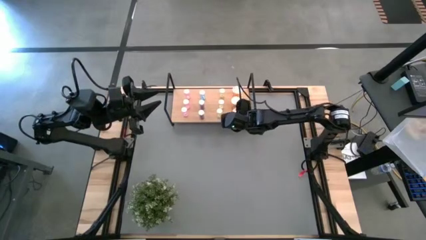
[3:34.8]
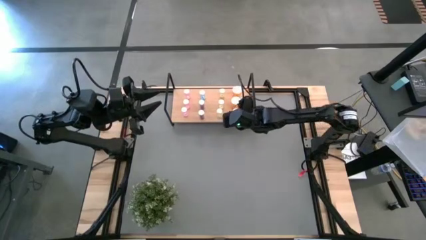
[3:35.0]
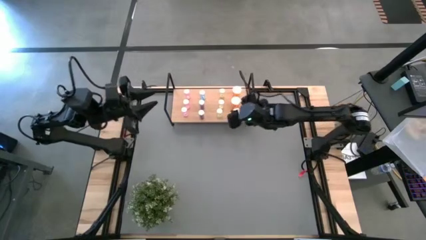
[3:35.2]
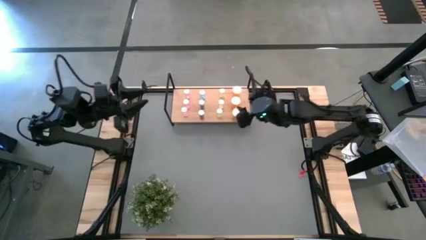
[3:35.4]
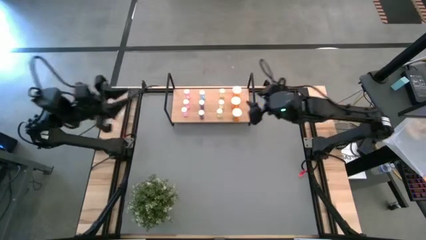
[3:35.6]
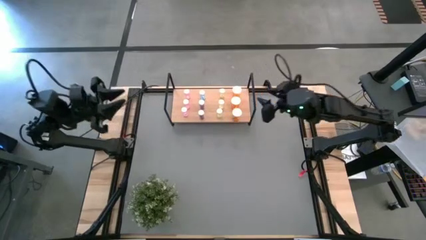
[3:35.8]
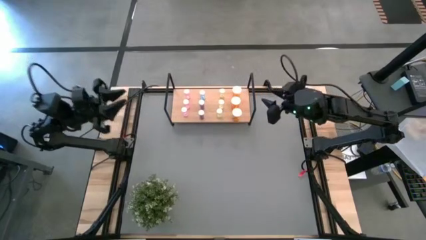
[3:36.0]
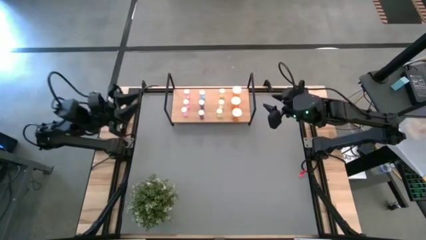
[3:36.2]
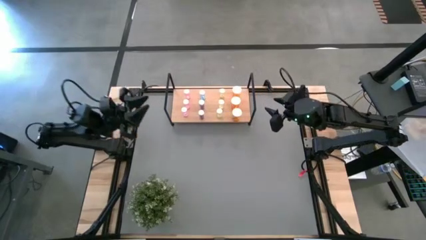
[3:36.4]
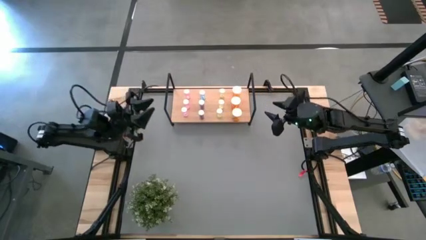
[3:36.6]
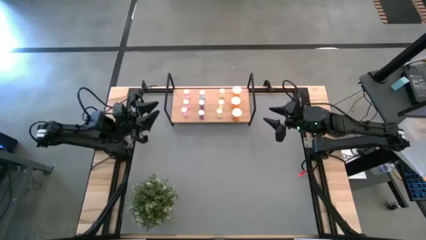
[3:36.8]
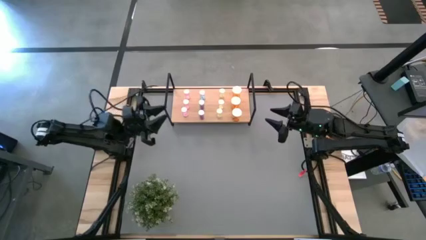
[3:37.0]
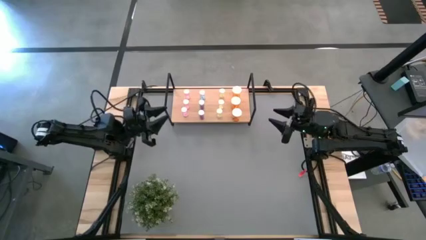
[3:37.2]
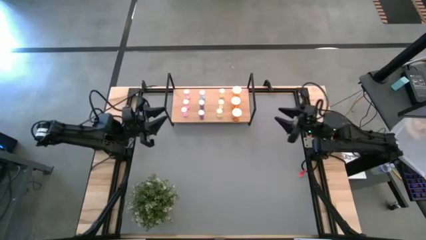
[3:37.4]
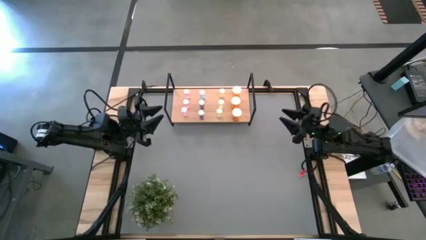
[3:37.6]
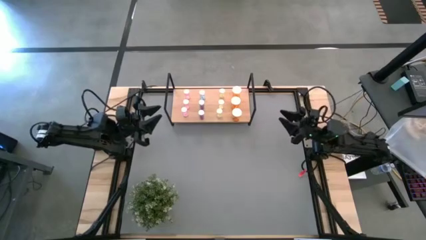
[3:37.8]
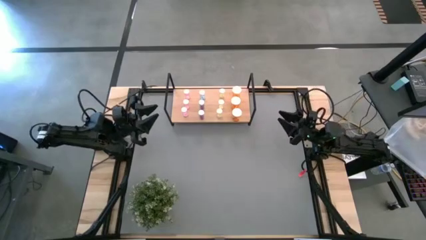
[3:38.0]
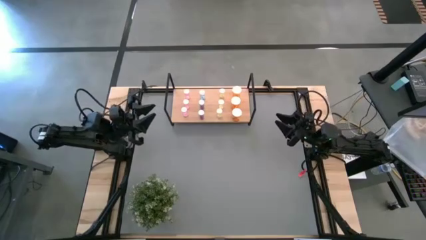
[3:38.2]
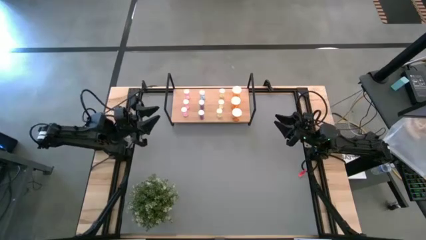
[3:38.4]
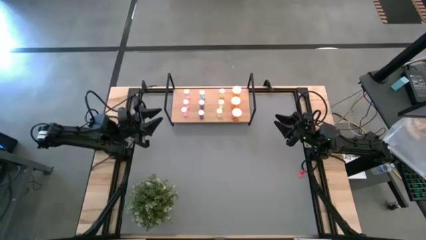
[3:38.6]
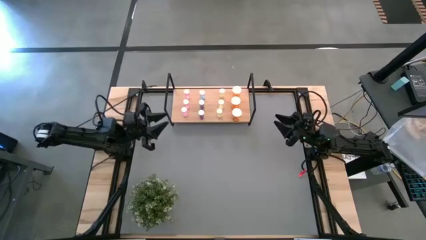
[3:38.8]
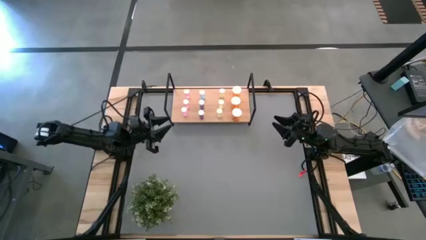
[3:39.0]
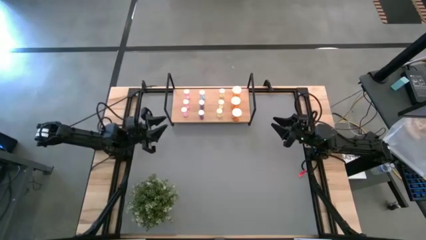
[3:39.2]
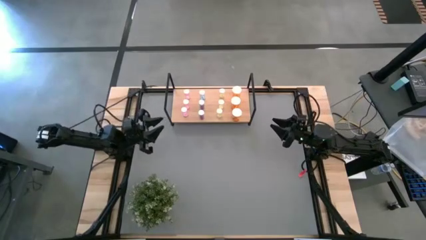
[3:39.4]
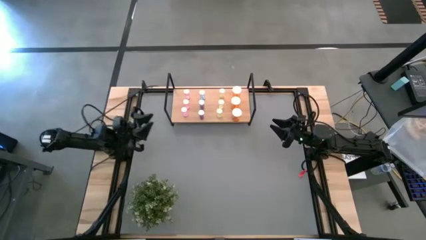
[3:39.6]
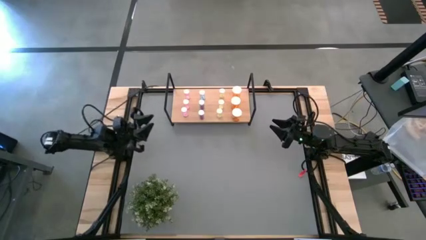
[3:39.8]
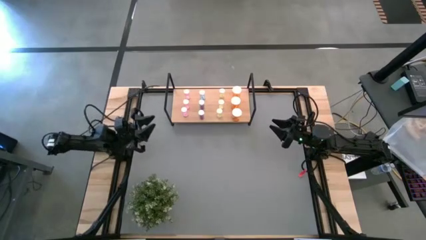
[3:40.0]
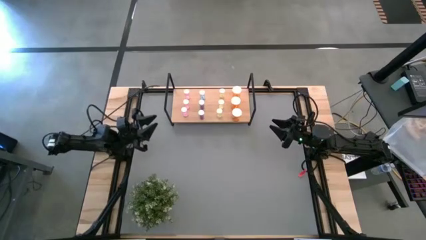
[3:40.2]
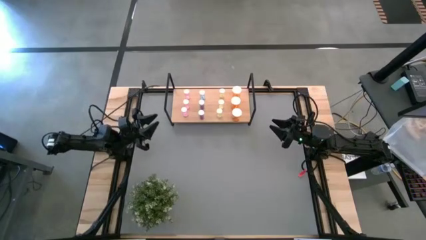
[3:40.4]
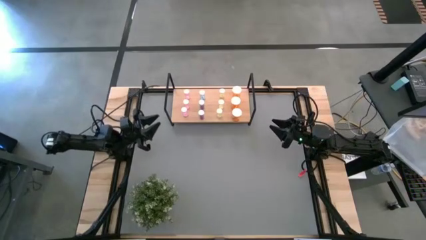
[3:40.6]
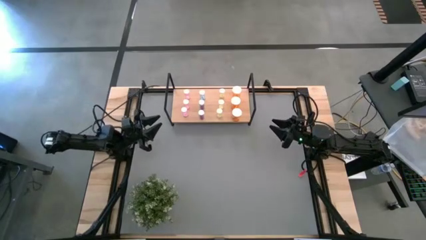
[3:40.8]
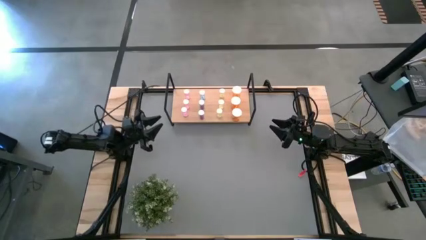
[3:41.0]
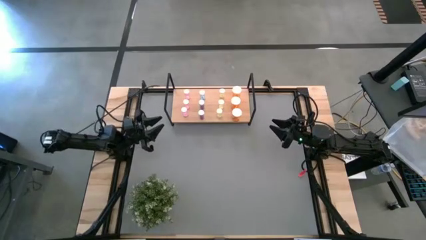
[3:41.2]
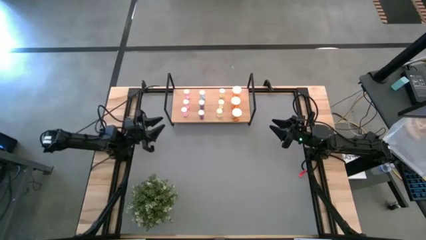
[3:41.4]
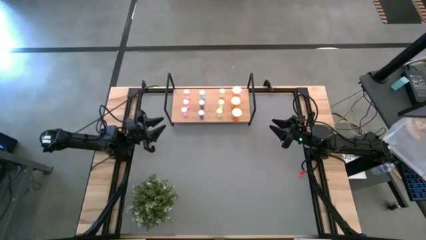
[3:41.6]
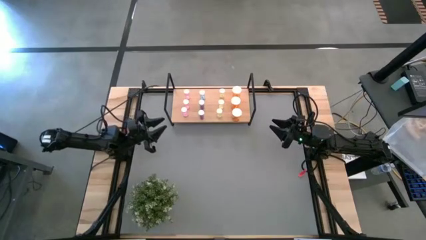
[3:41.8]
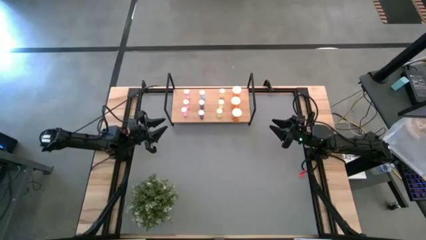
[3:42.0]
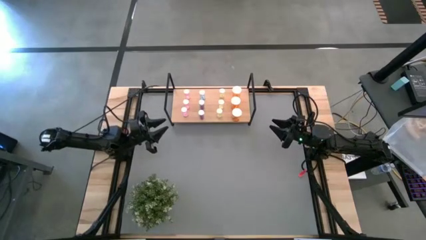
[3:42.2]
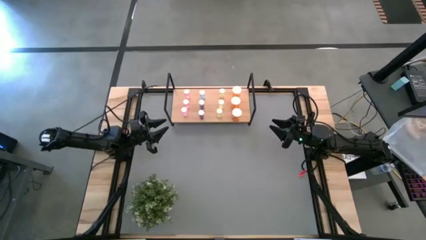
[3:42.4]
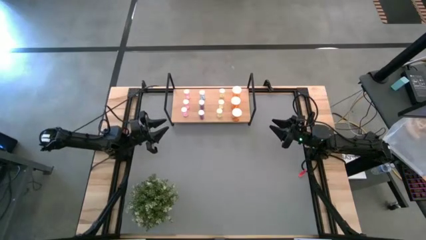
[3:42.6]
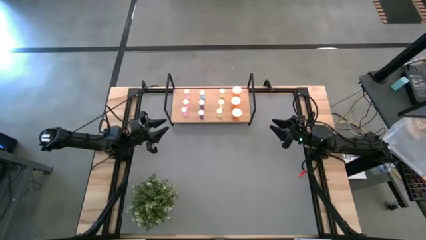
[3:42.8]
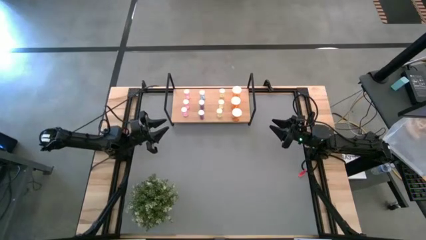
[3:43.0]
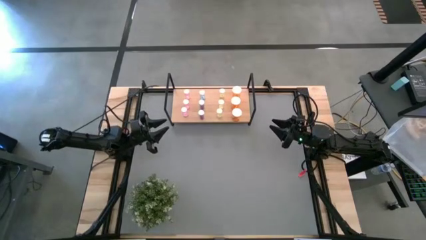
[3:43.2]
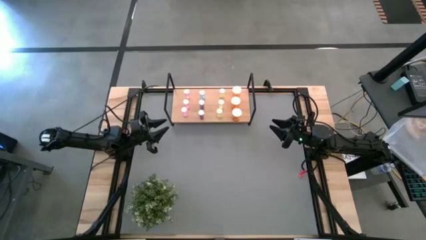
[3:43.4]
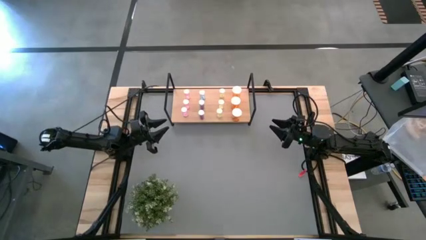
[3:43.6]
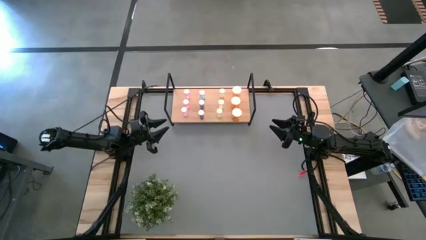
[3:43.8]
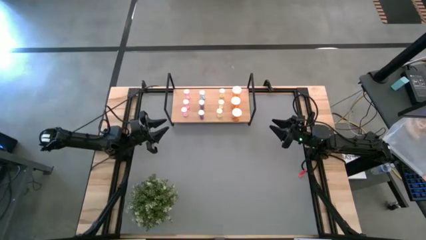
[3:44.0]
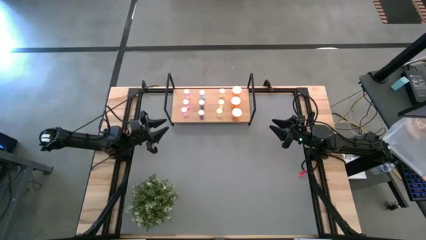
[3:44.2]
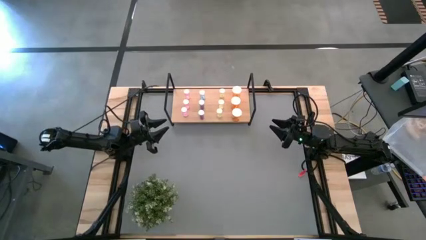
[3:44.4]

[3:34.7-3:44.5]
Task: Pick and place medicine bottles onto shelf by color
Return to Home Position
